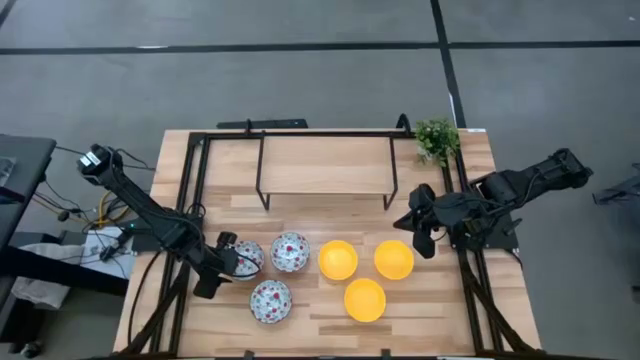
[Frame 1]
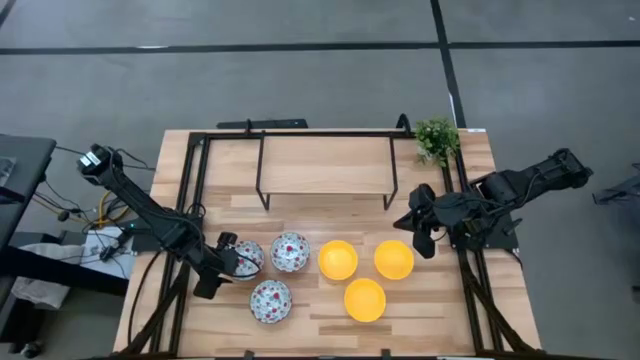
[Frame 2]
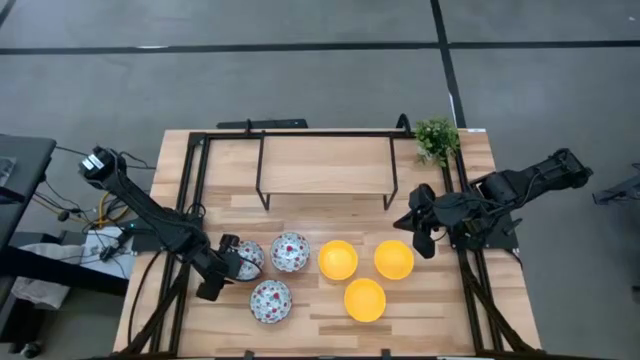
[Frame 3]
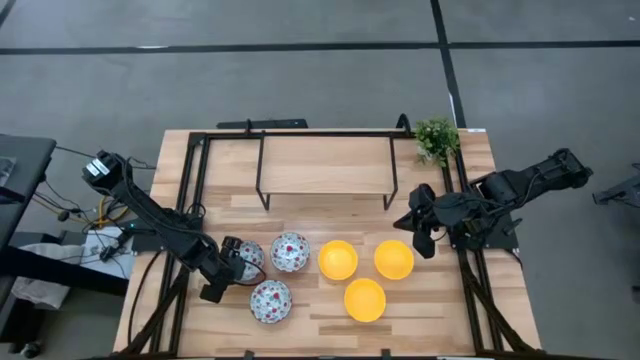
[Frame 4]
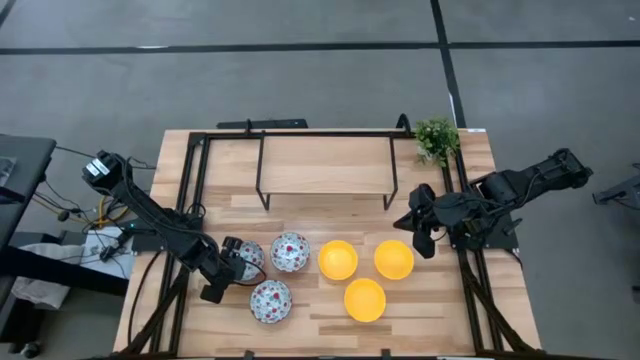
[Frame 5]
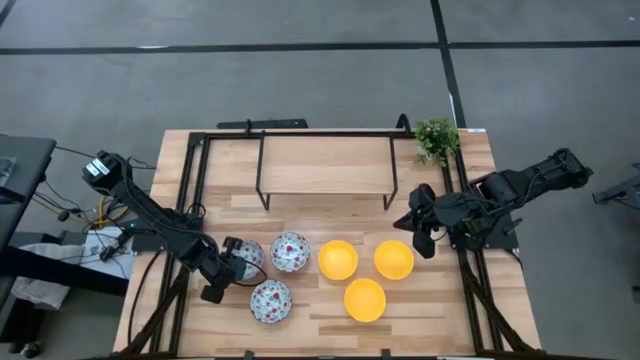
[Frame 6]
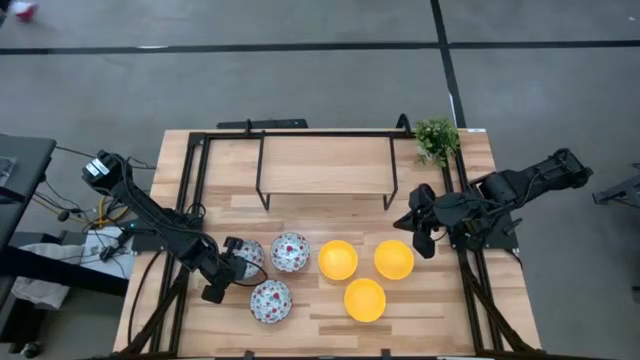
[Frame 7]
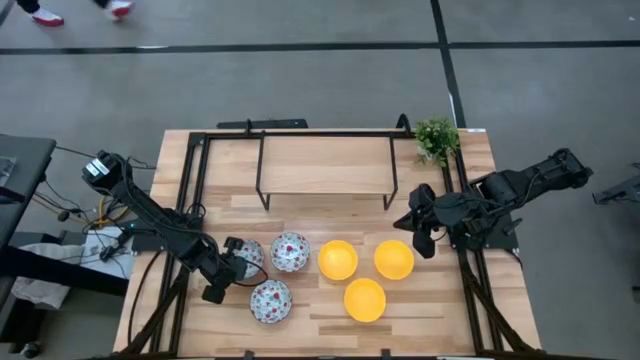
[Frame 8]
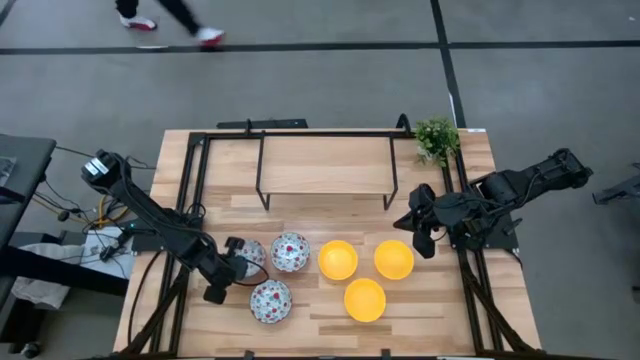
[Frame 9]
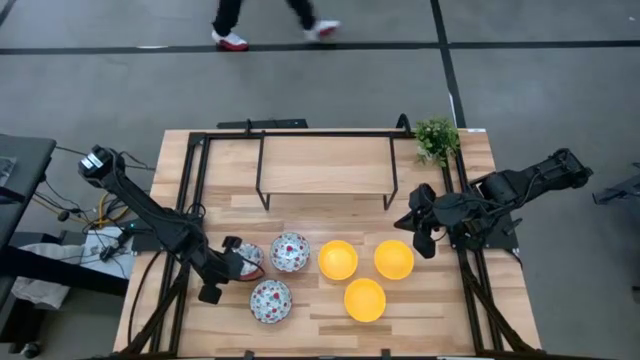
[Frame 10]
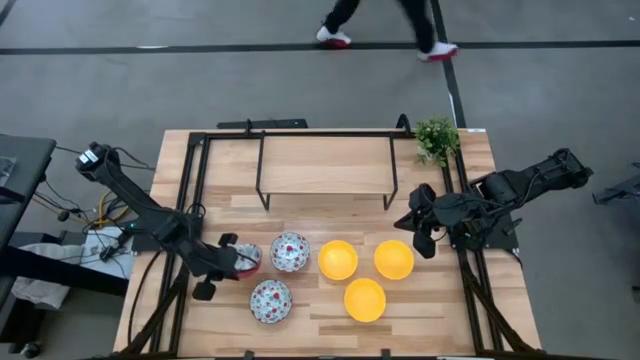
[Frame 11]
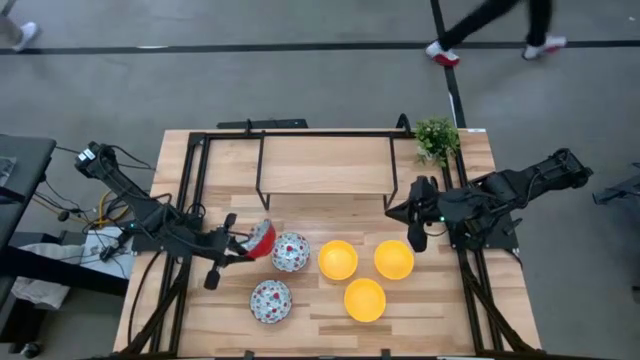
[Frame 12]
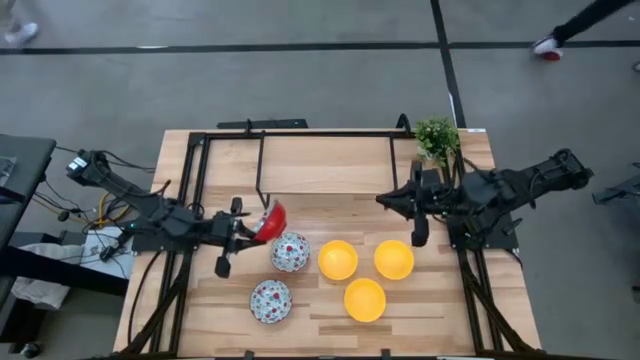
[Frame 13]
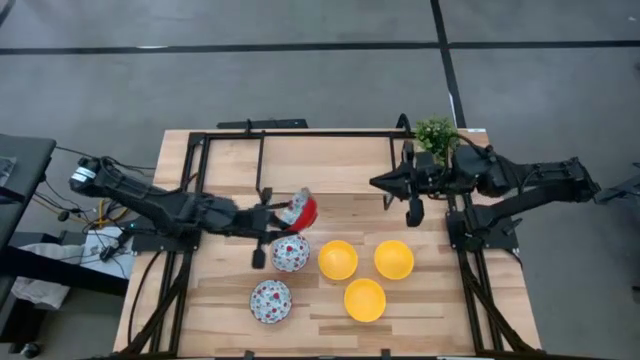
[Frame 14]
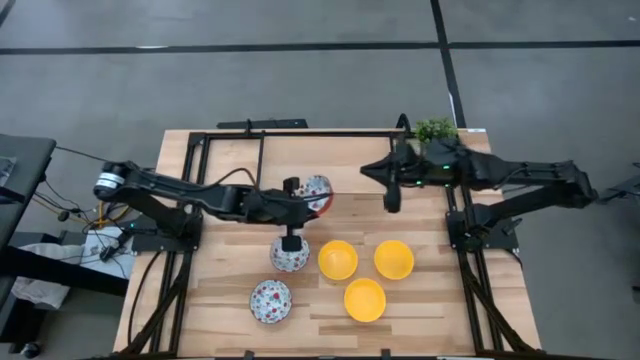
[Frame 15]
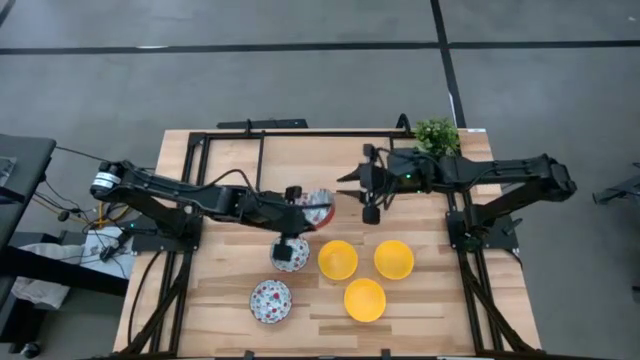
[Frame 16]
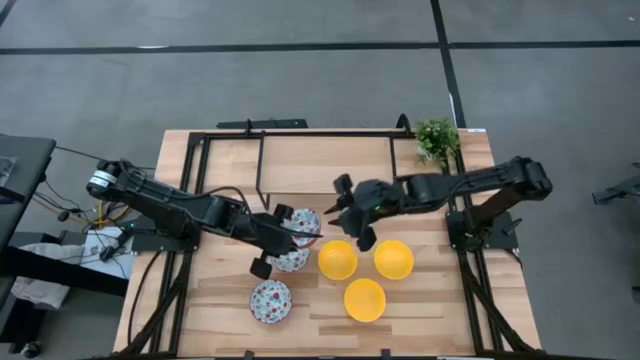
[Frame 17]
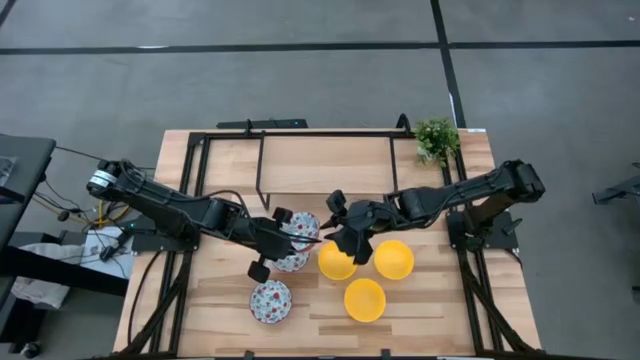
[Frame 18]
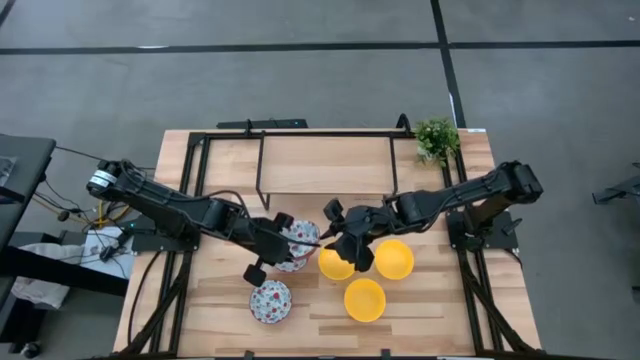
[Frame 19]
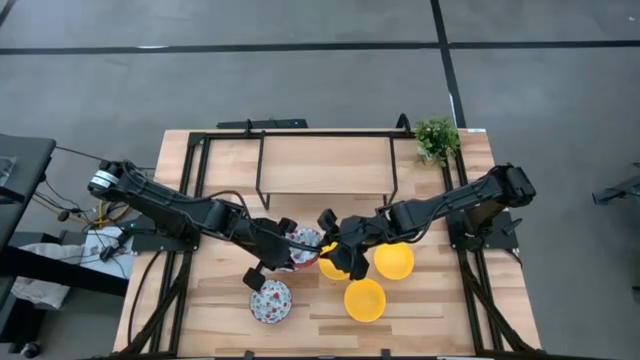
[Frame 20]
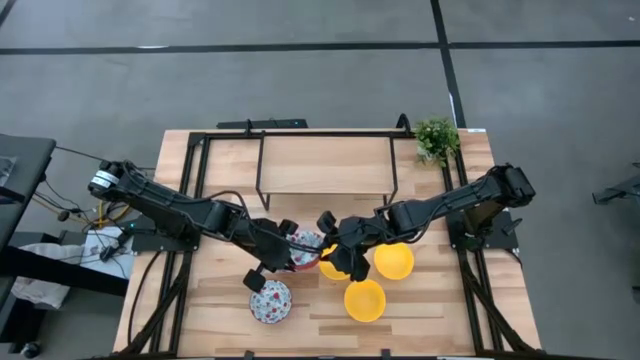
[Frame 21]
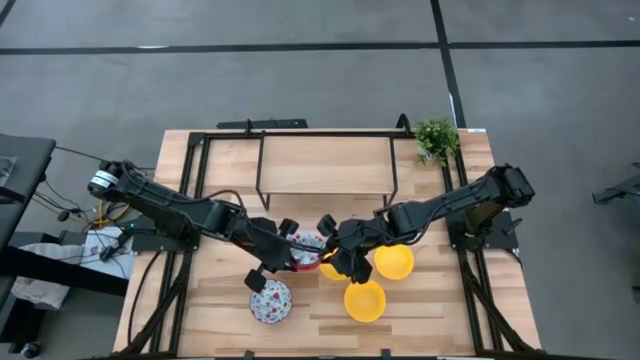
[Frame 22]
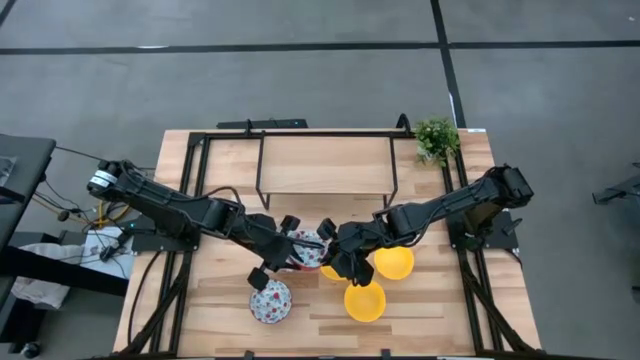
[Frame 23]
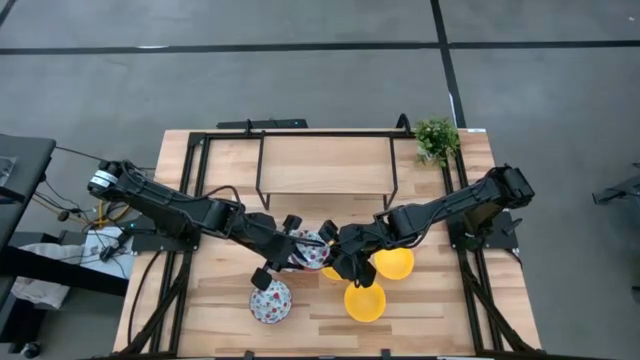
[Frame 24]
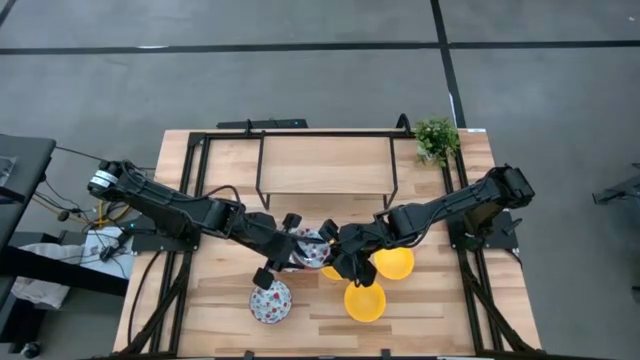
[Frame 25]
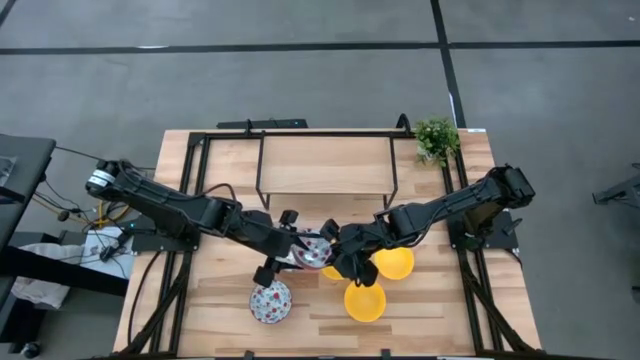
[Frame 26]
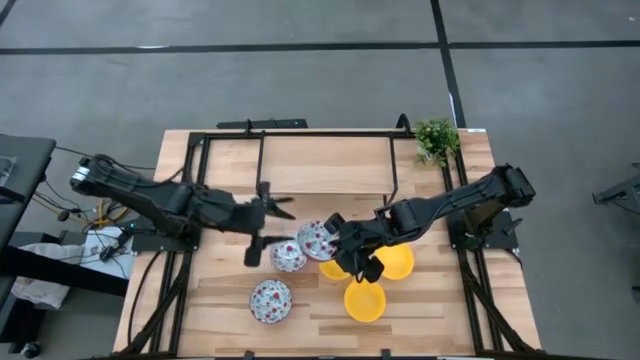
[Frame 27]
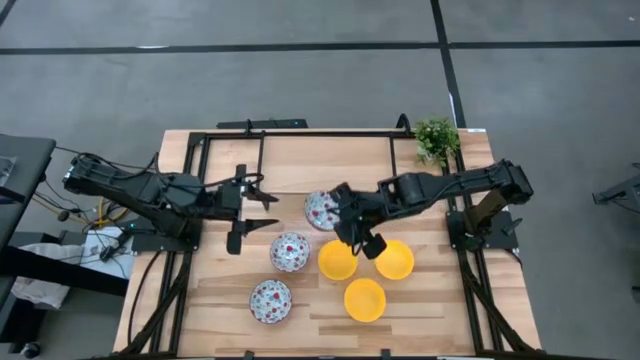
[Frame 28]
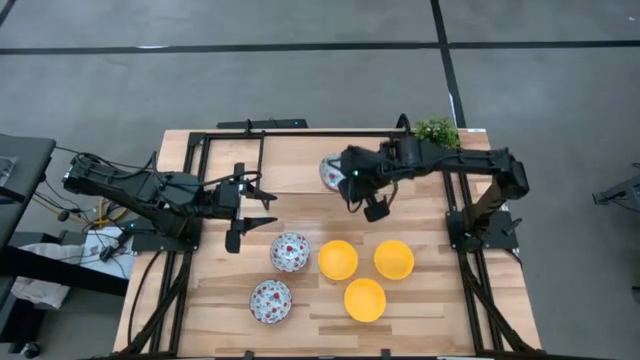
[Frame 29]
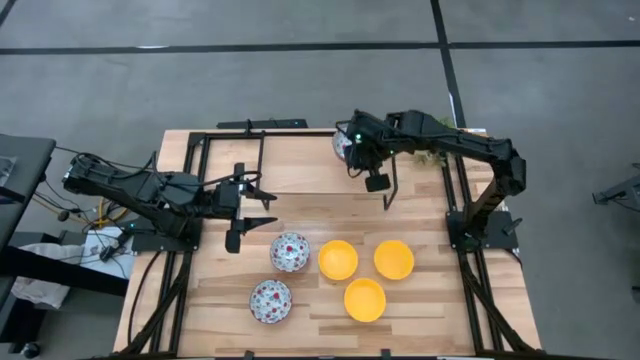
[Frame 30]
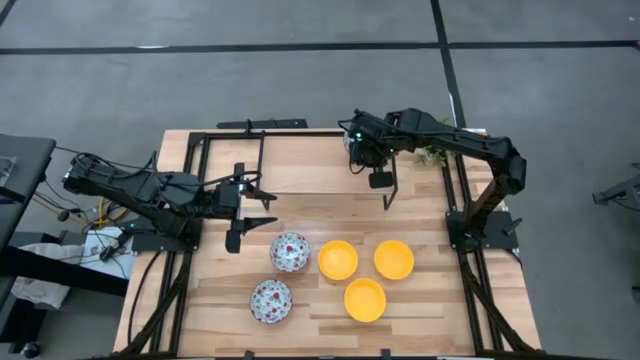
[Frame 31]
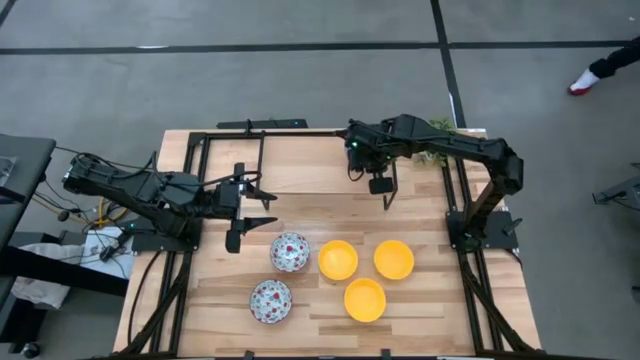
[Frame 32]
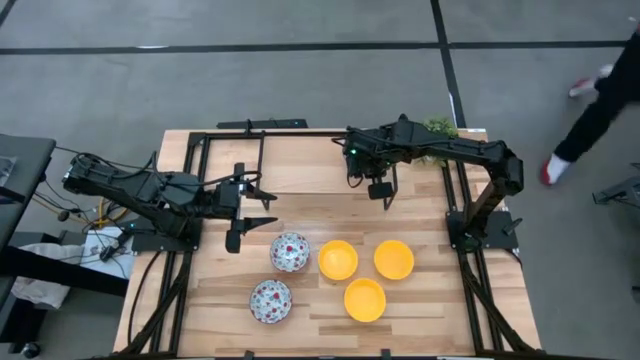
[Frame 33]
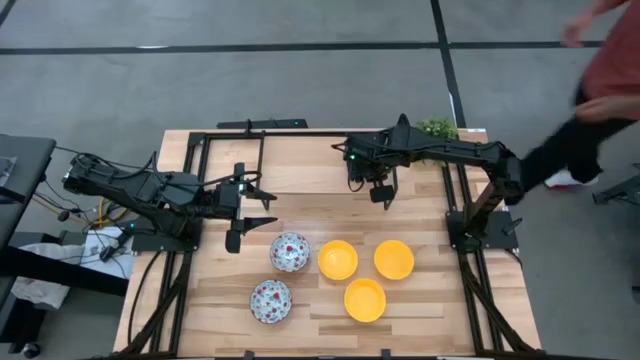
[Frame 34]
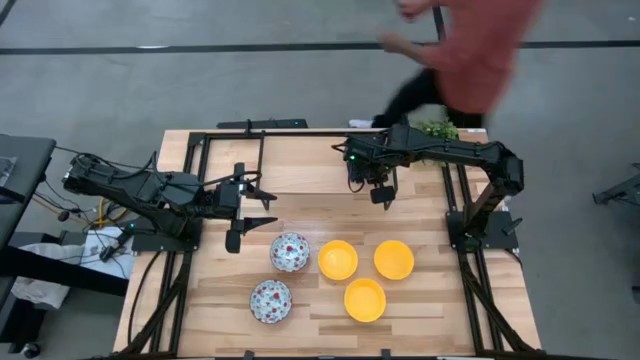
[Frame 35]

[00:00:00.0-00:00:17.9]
Task: Pick & Place Mini bowls
Put the top left red patterned bowl on the shelf
